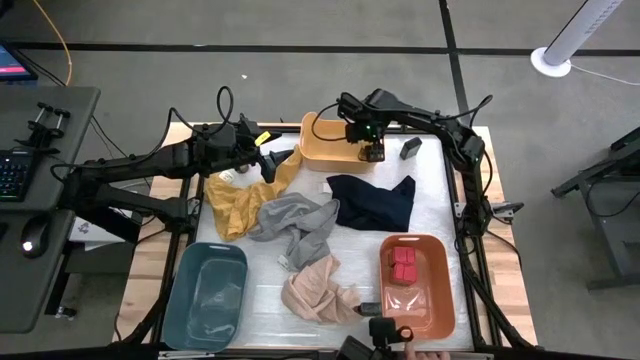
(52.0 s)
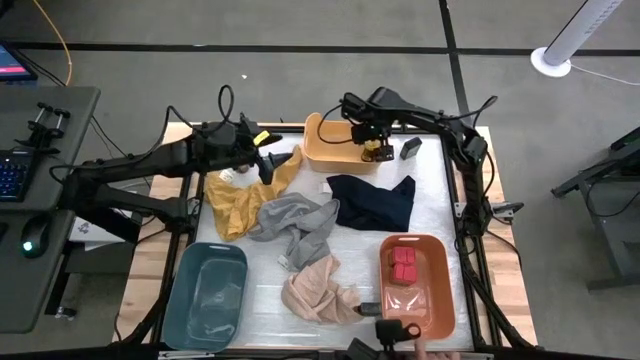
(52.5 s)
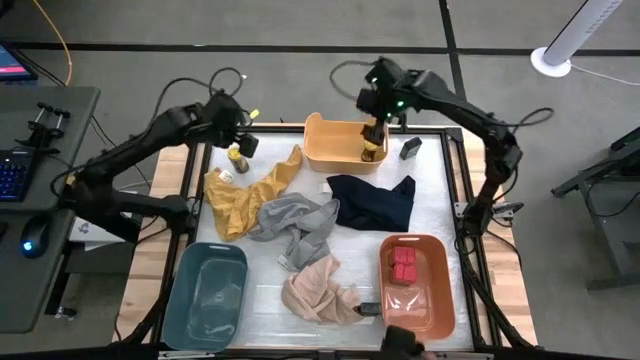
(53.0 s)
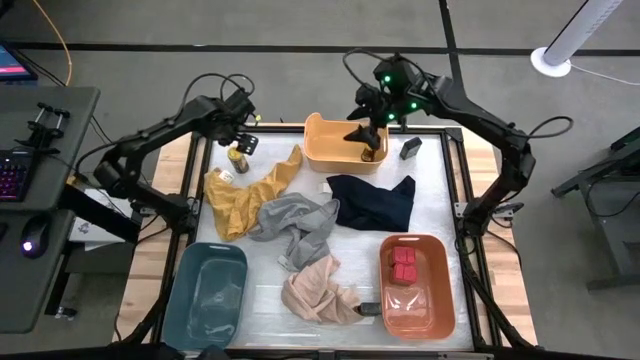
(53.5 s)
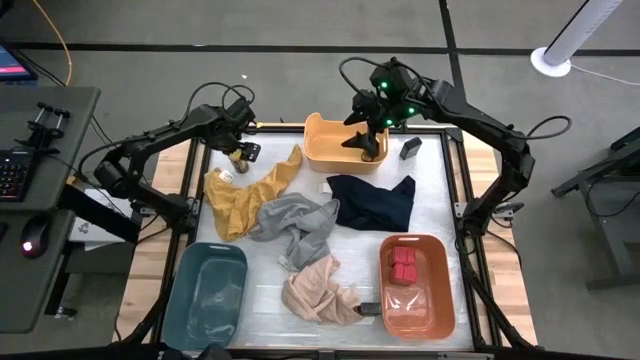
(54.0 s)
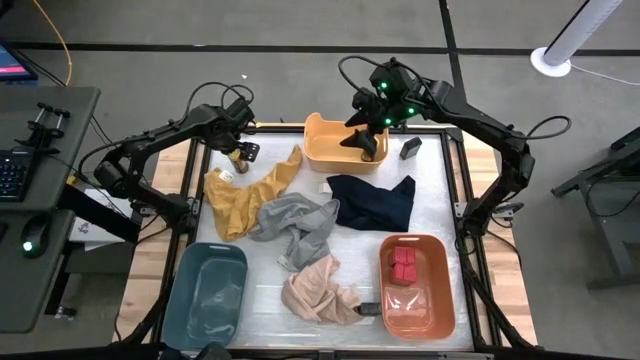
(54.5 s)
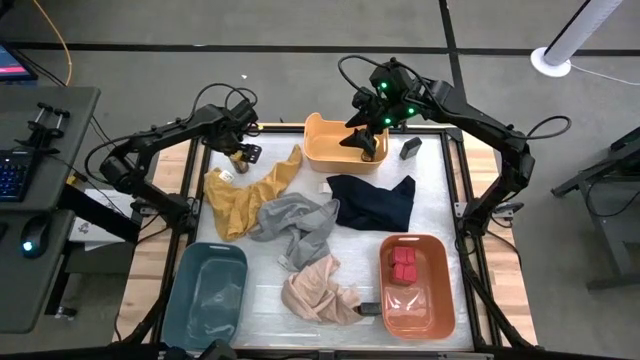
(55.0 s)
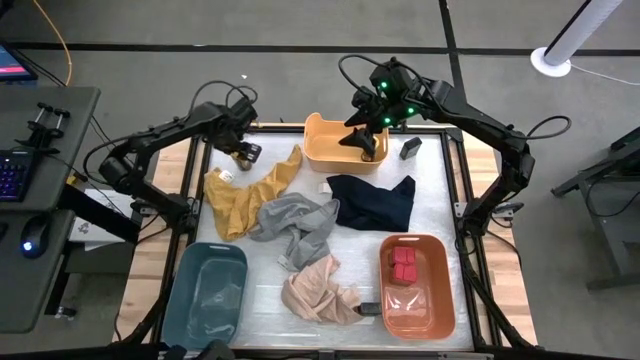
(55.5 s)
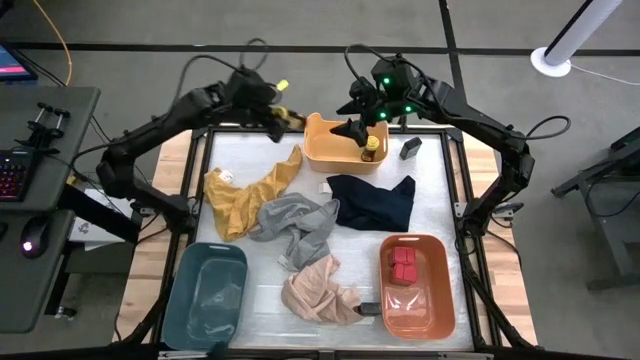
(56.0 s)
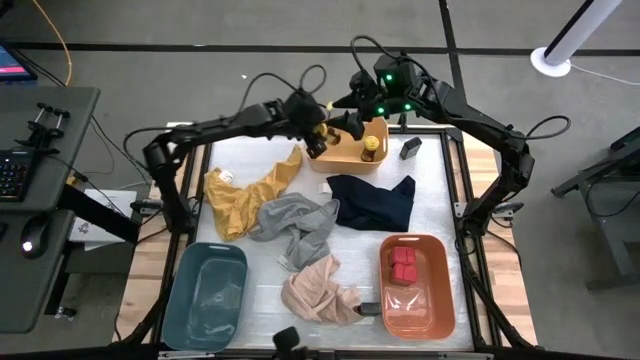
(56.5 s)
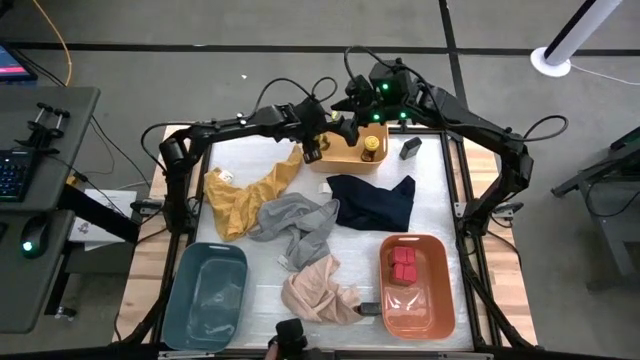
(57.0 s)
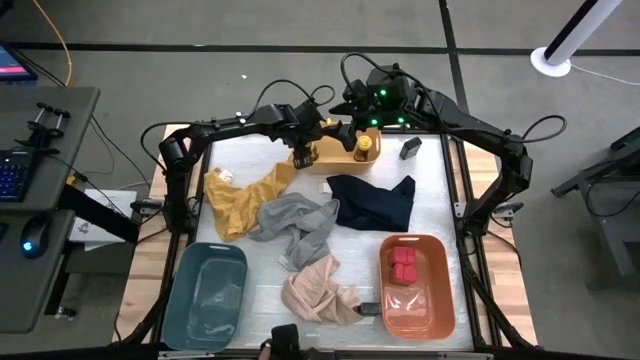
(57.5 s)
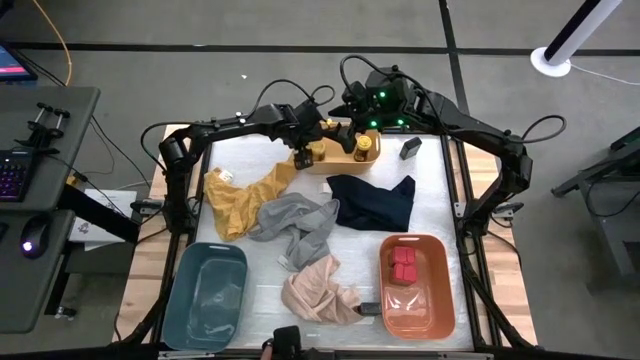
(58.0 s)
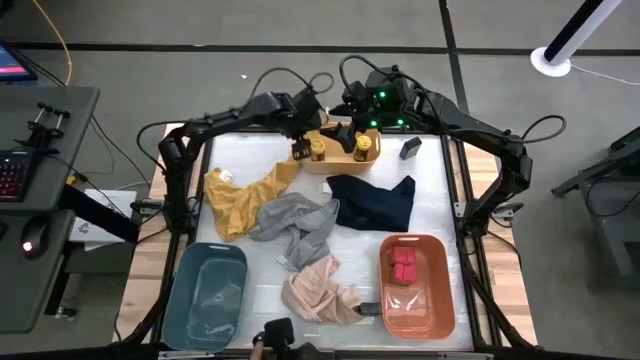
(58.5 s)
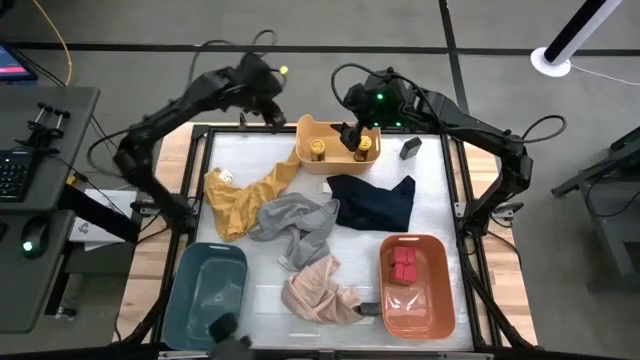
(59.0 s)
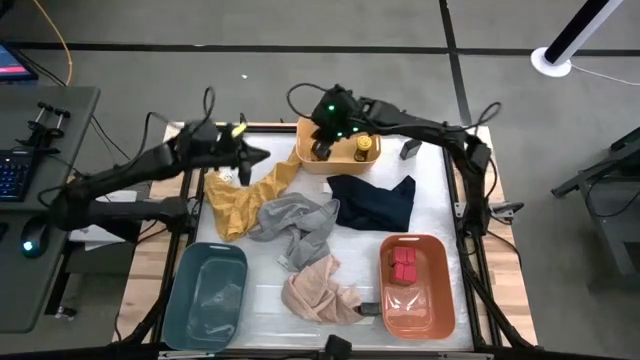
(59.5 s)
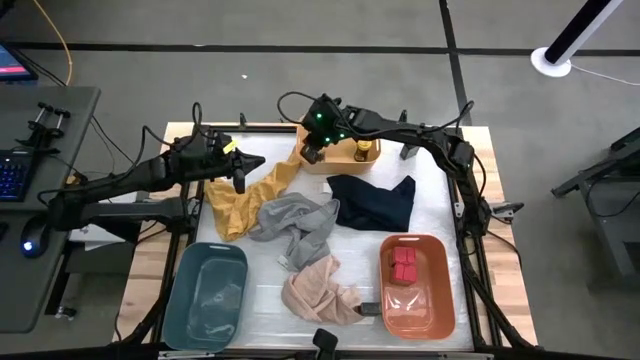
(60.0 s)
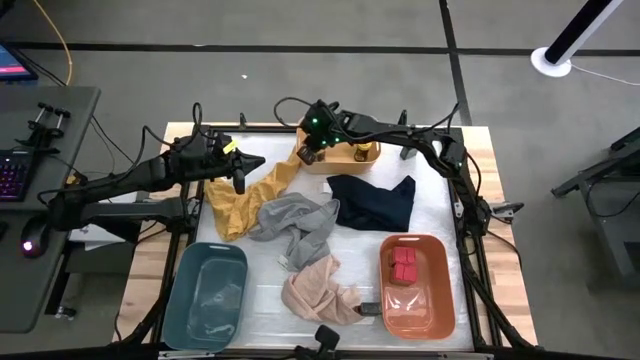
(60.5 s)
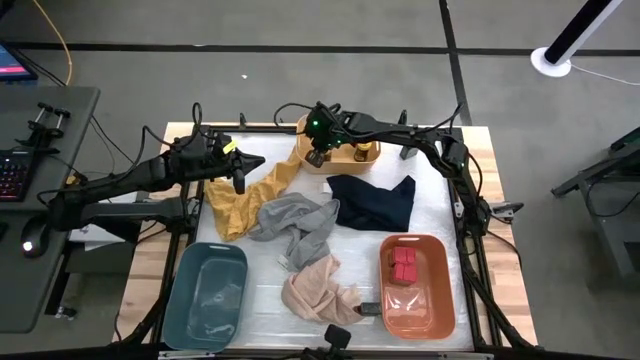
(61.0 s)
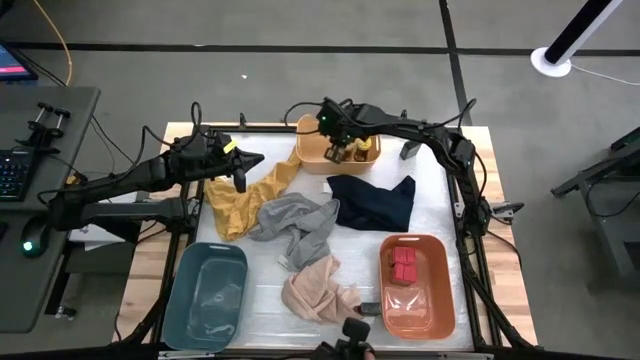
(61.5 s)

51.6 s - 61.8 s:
Task: Sort spices by type
Put the yellow seasoning bottle into the yellow bin

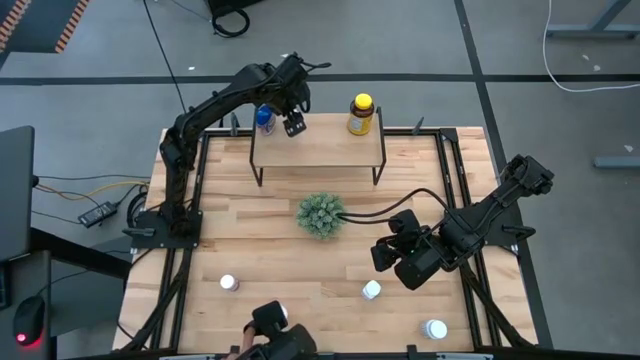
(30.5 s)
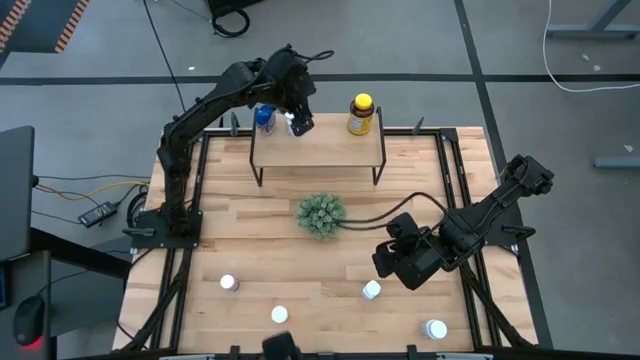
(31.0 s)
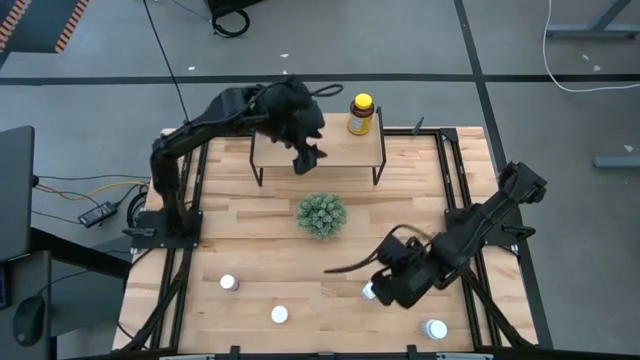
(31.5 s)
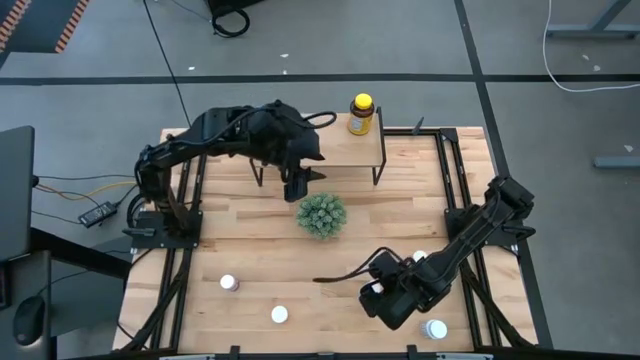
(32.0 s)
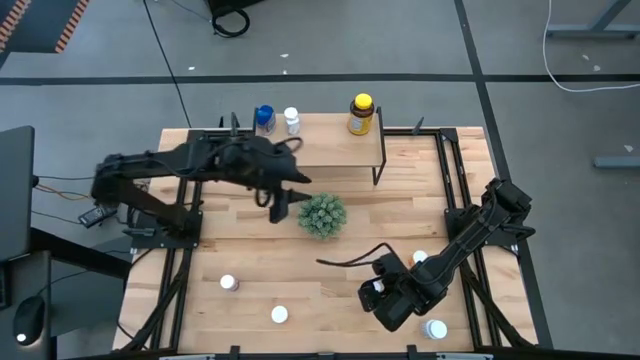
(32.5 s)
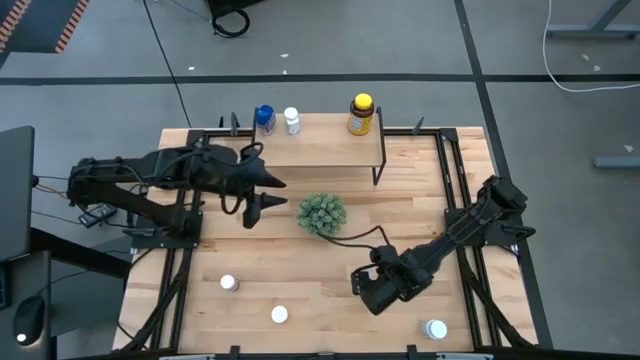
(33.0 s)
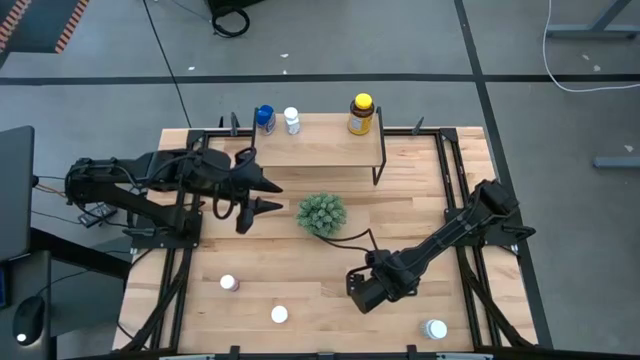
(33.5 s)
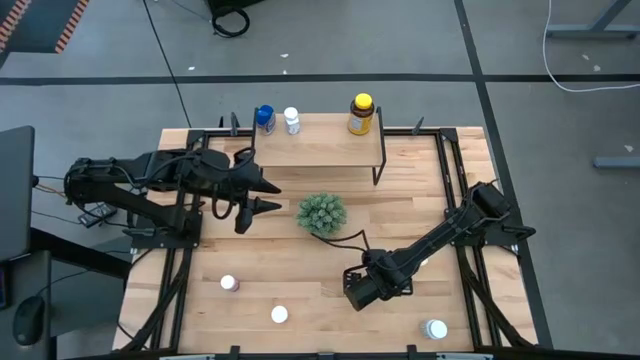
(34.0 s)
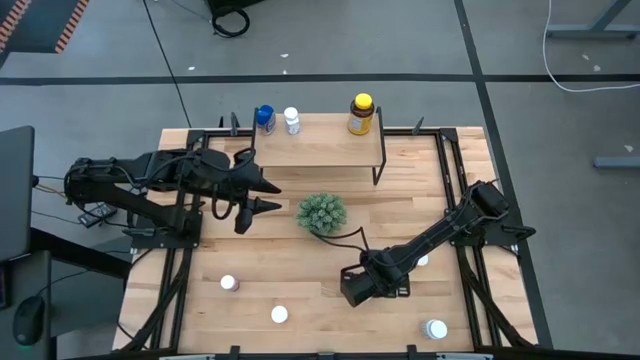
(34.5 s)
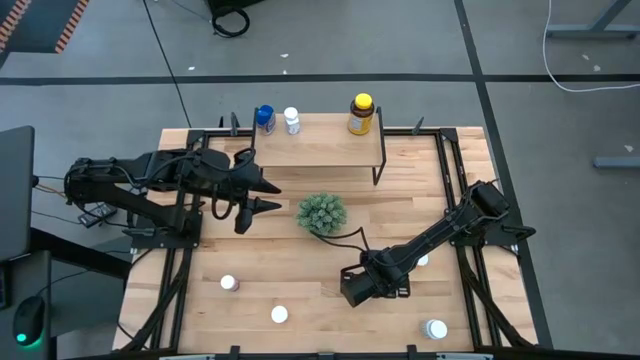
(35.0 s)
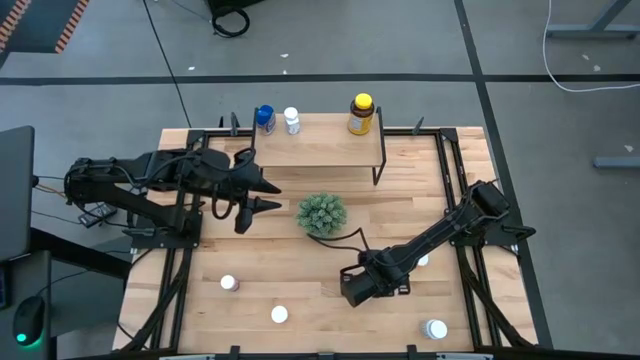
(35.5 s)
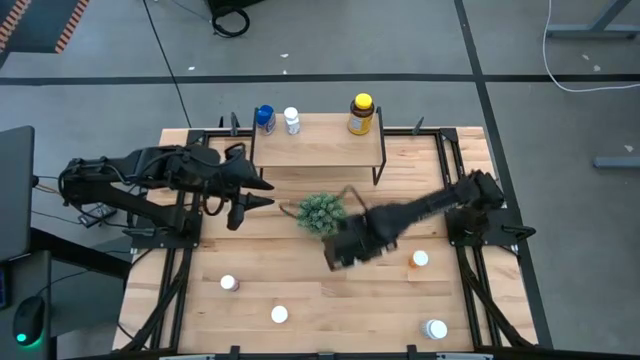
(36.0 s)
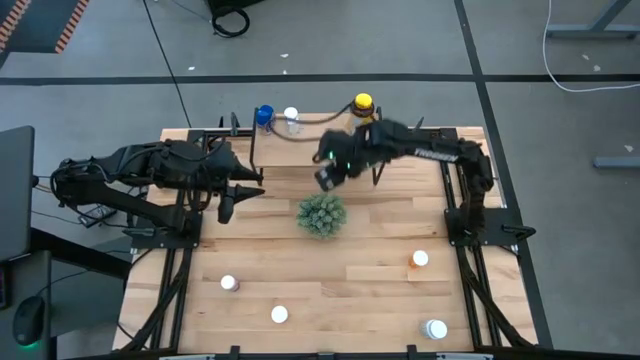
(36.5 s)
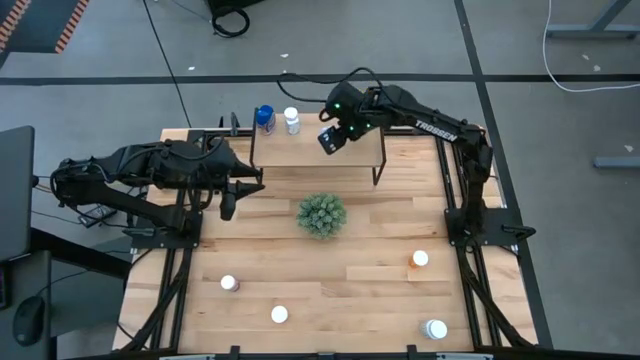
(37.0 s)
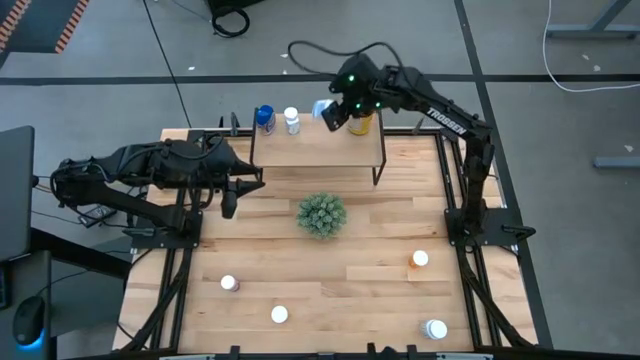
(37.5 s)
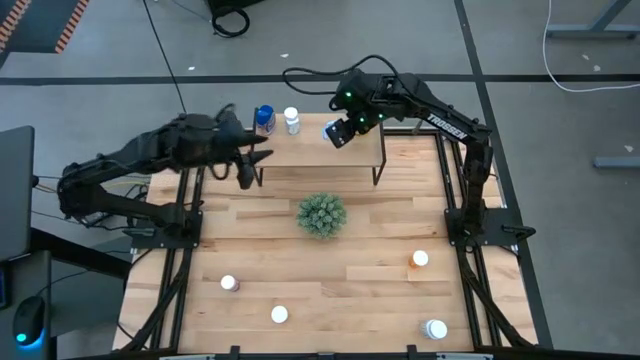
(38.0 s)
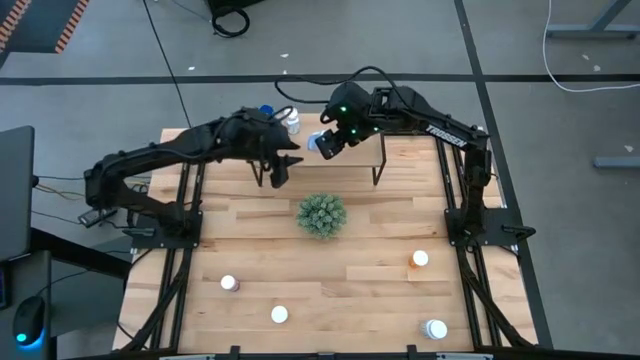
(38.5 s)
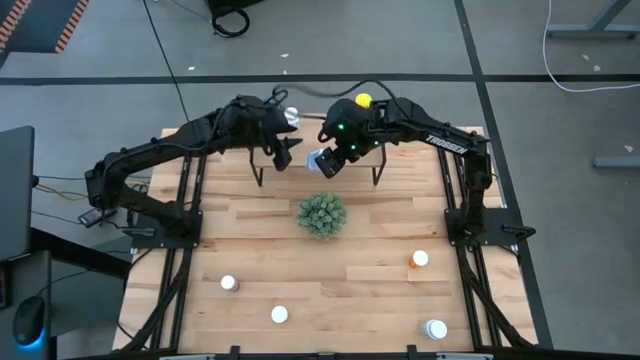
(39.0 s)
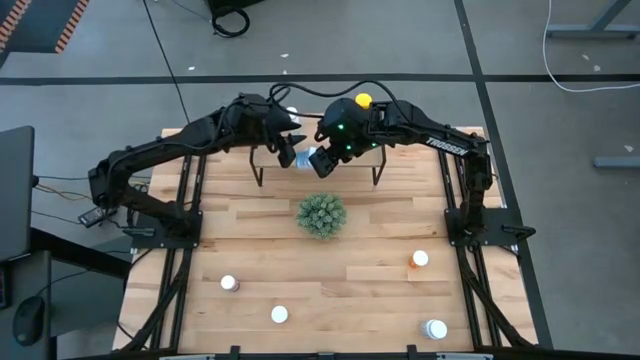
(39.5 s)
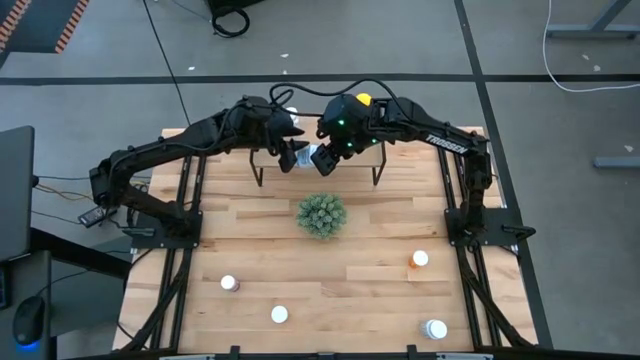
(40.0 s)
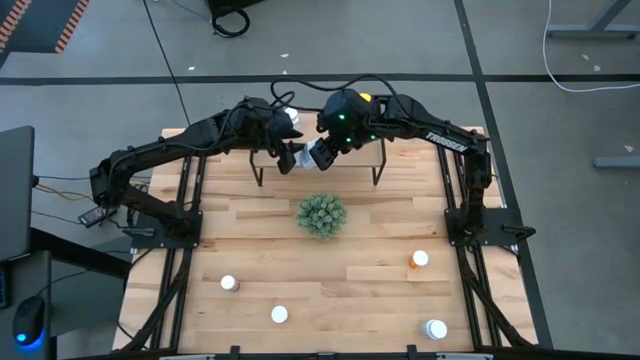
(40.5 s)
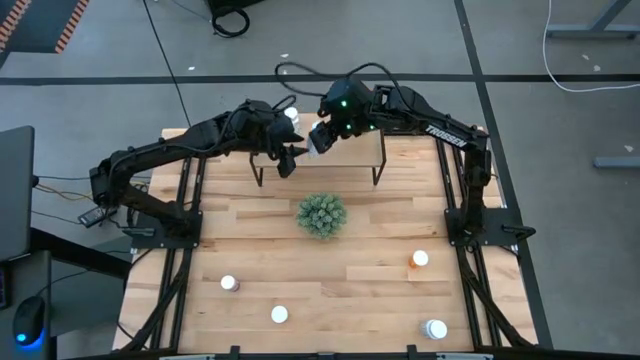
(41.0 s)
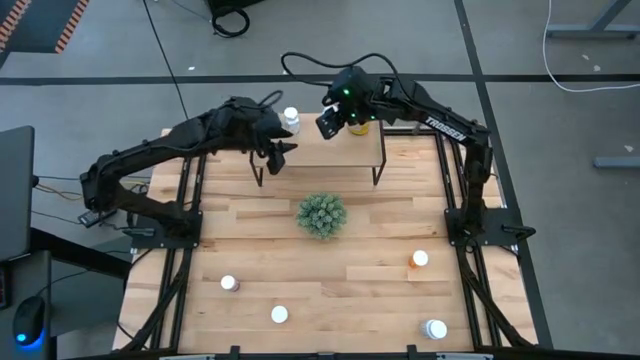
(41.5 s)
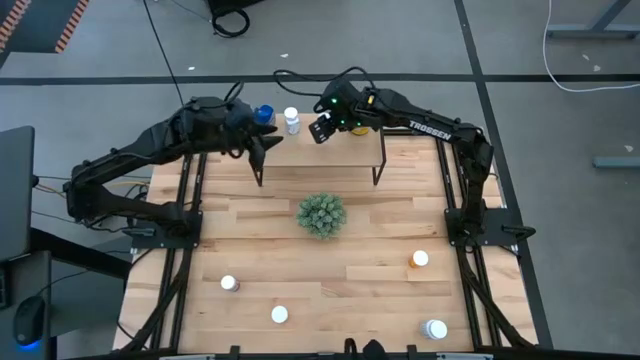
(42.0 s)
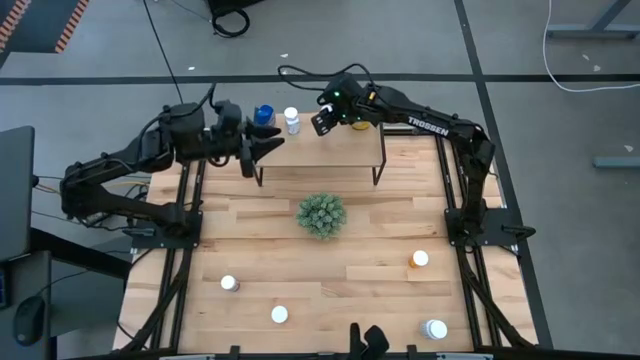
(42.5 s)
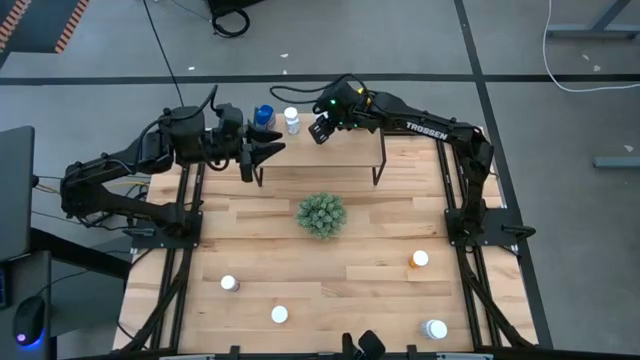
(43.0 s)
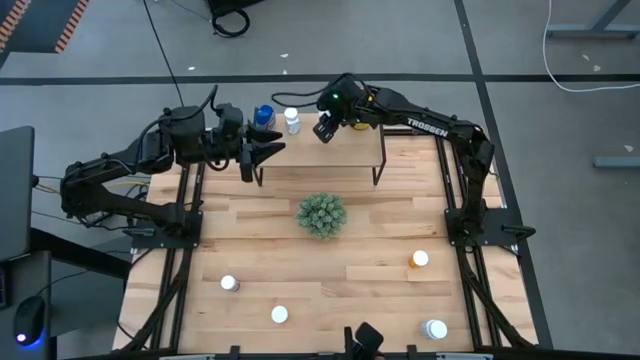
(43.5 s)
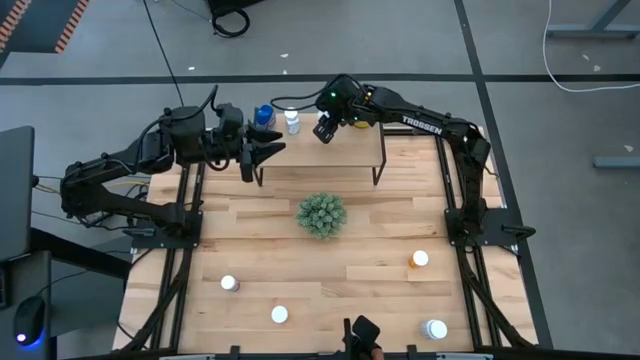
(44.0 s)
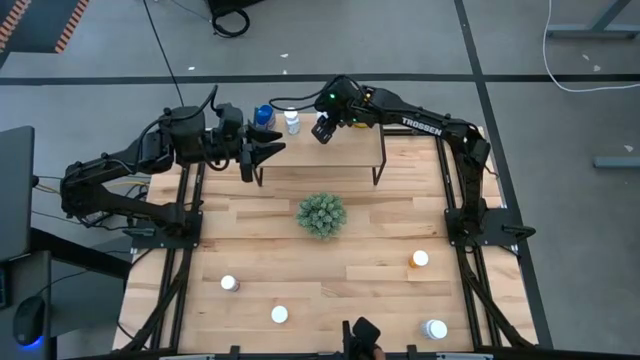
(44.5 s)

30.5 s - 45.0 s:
Task: Pick and place medicine bottles onto shelf by color
Put the right white medicine bottle on the shelf
